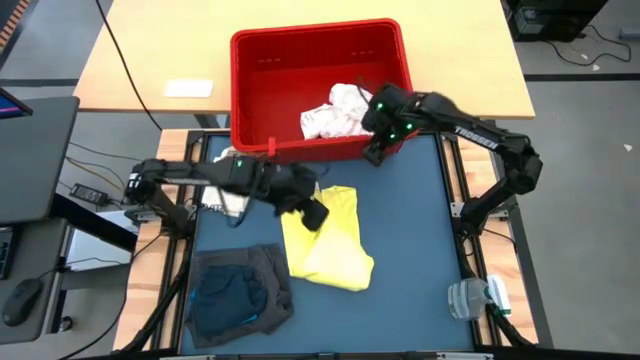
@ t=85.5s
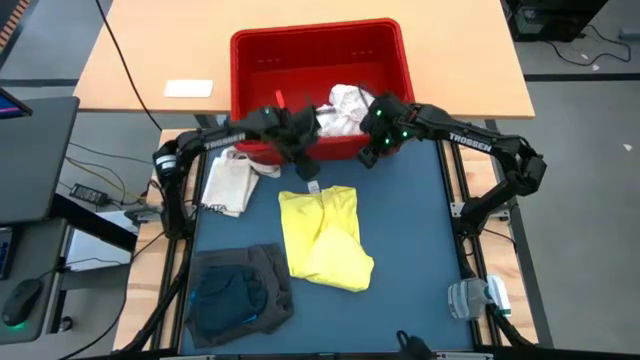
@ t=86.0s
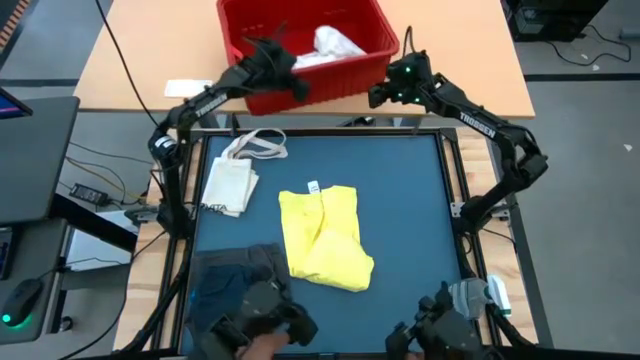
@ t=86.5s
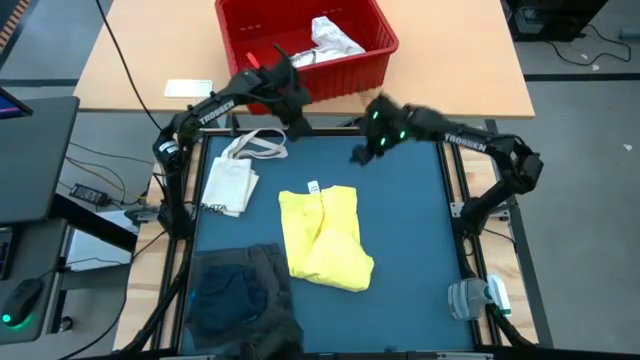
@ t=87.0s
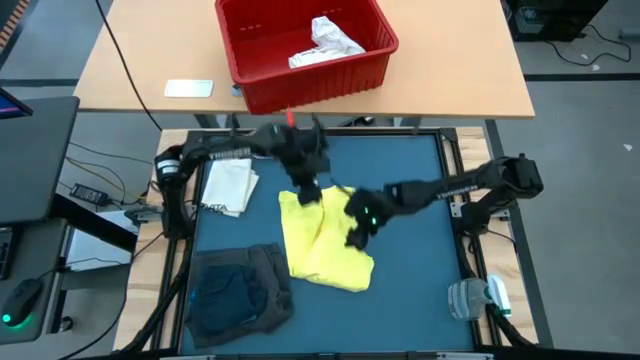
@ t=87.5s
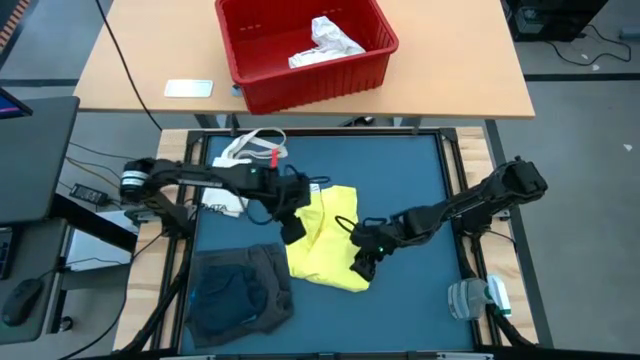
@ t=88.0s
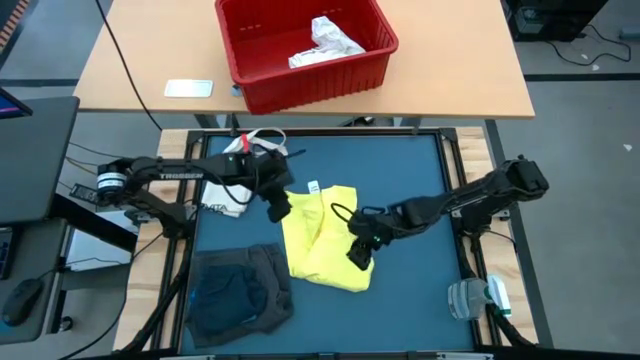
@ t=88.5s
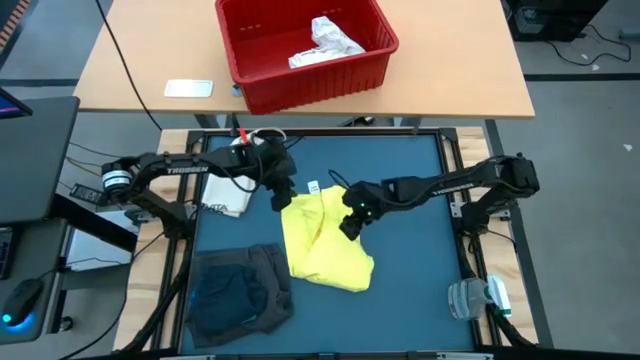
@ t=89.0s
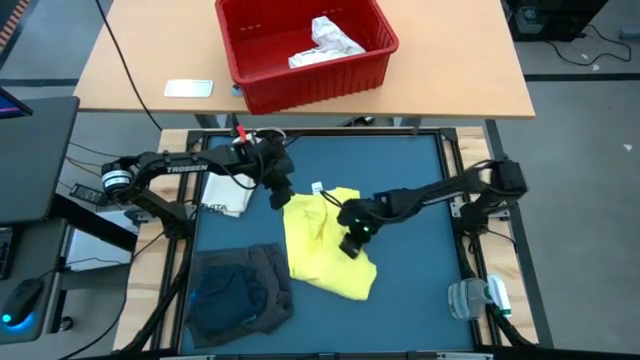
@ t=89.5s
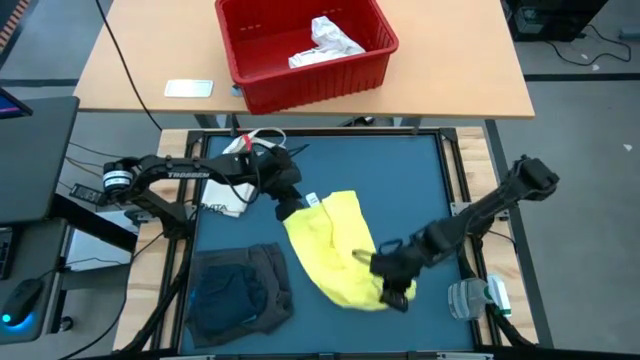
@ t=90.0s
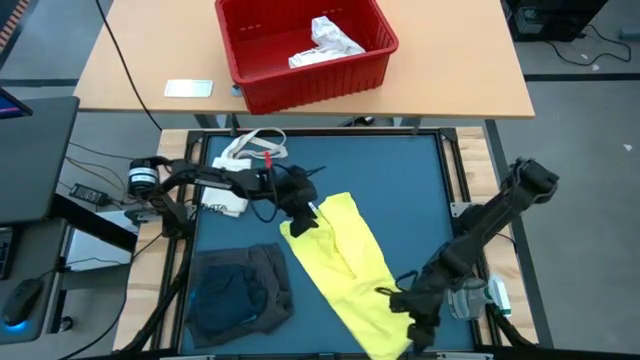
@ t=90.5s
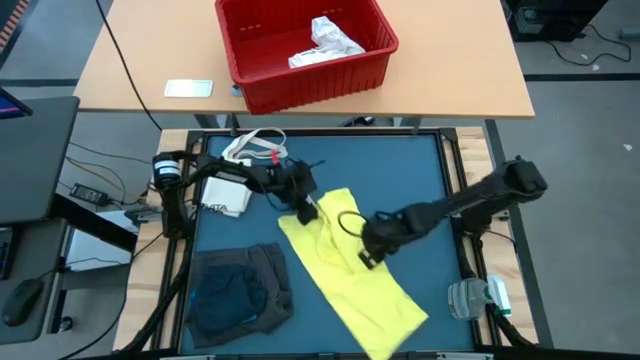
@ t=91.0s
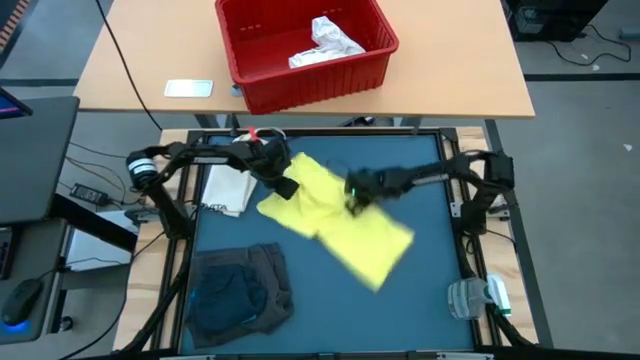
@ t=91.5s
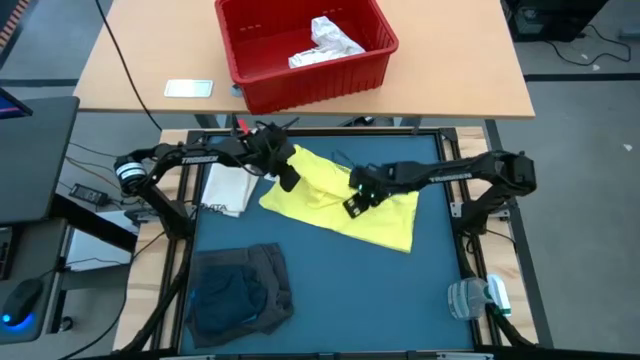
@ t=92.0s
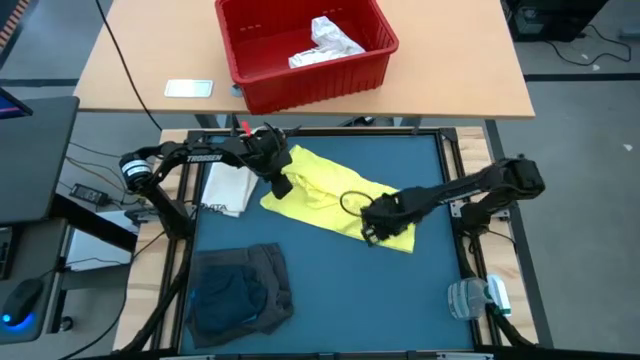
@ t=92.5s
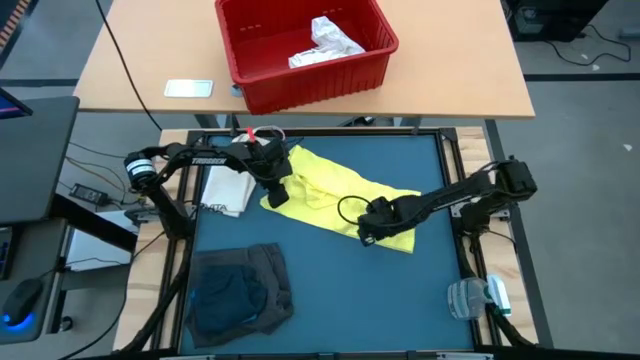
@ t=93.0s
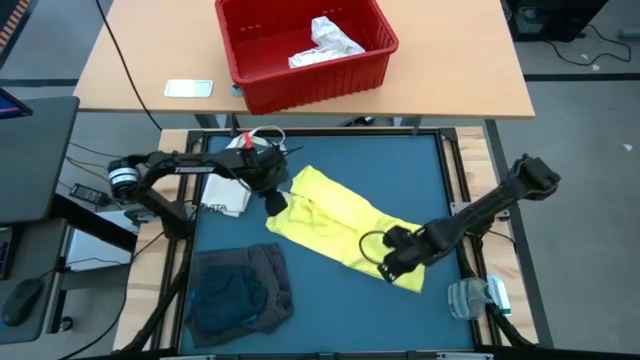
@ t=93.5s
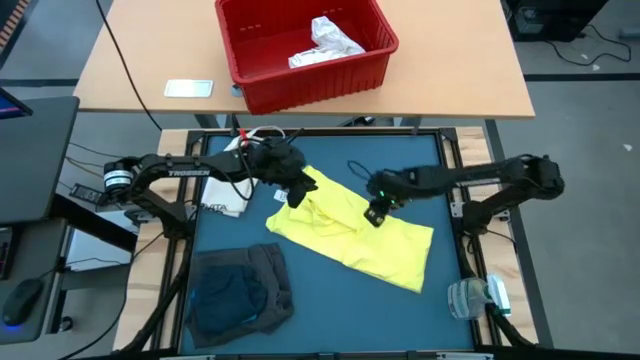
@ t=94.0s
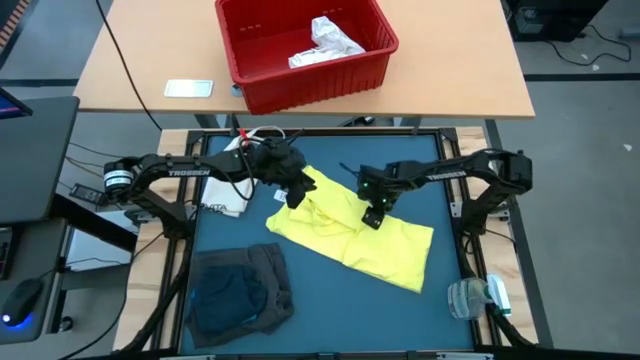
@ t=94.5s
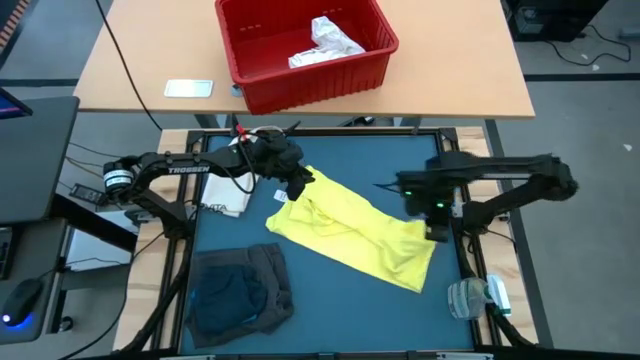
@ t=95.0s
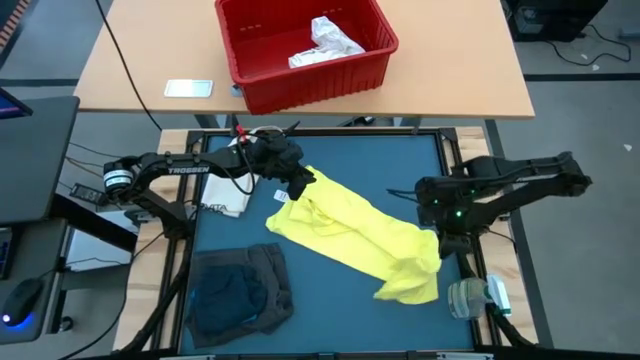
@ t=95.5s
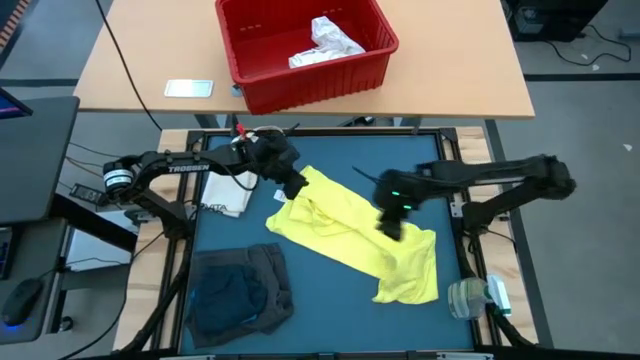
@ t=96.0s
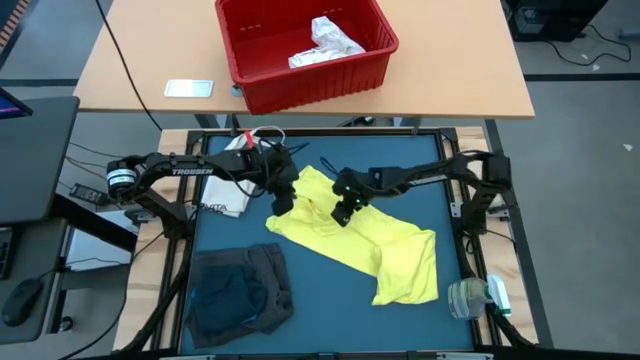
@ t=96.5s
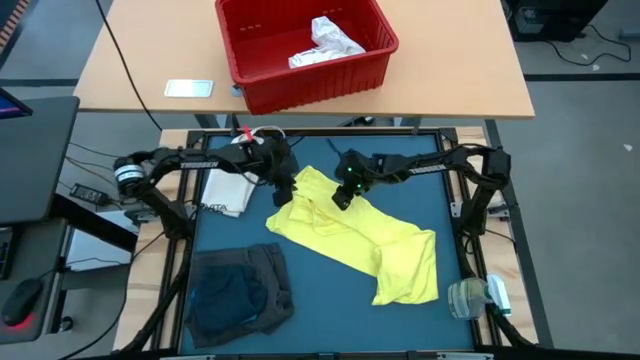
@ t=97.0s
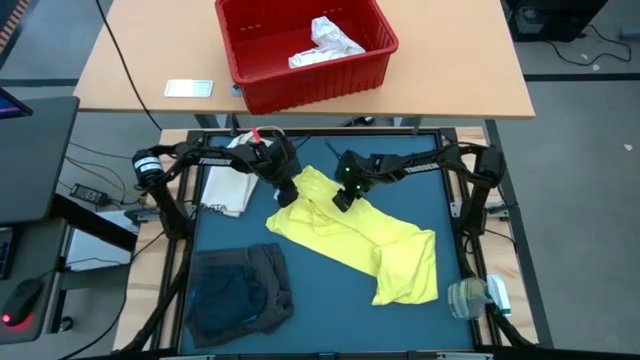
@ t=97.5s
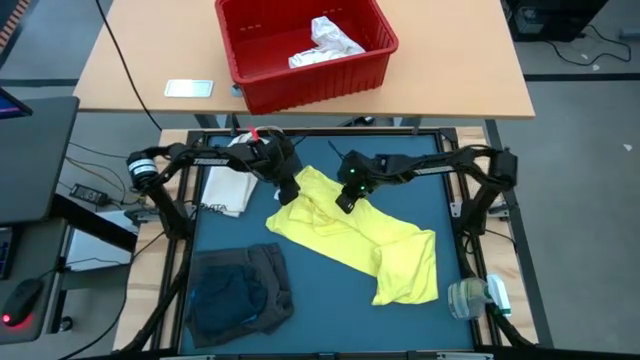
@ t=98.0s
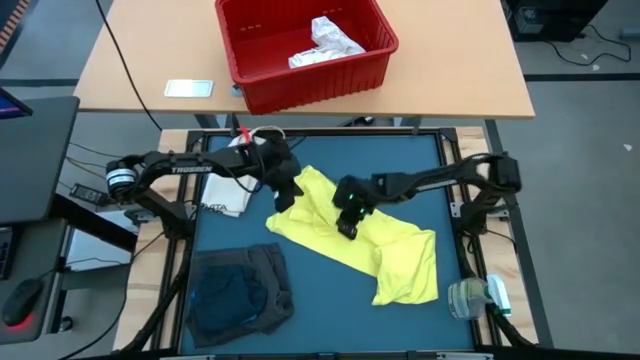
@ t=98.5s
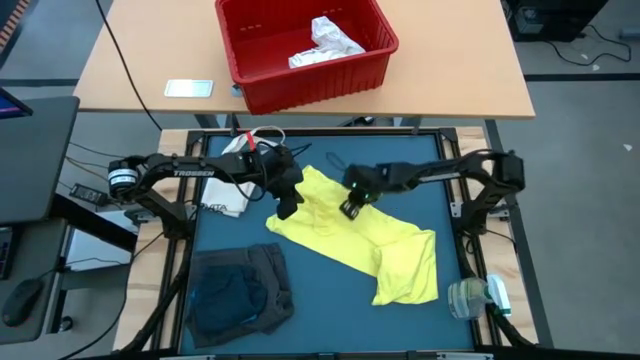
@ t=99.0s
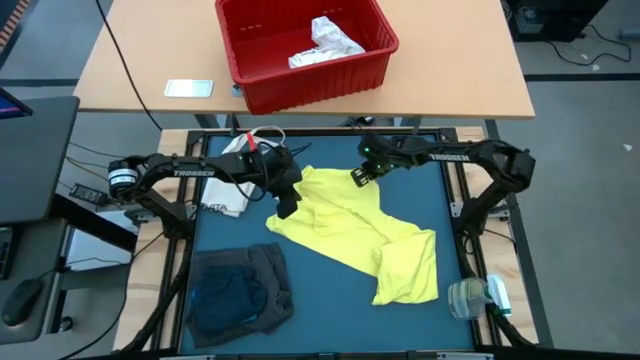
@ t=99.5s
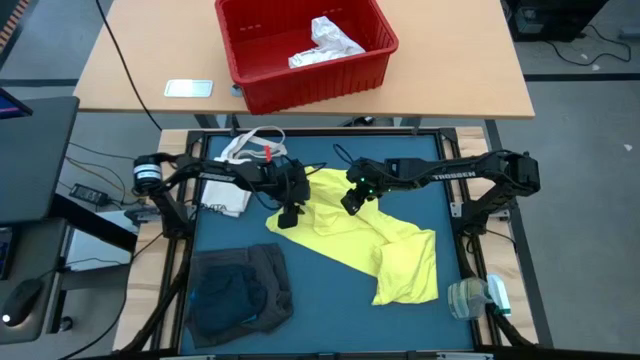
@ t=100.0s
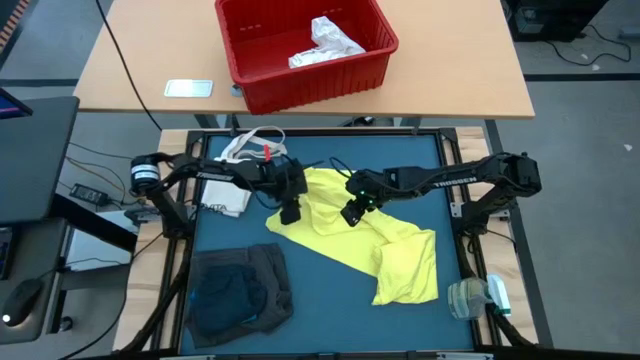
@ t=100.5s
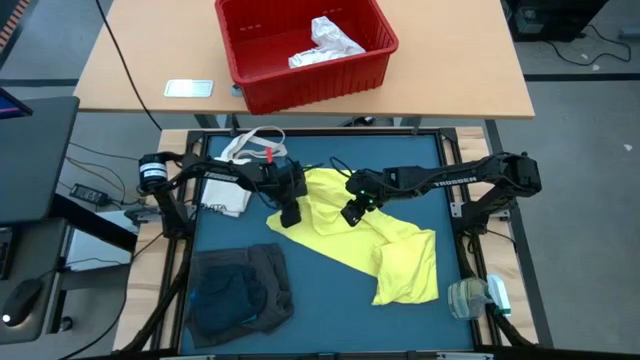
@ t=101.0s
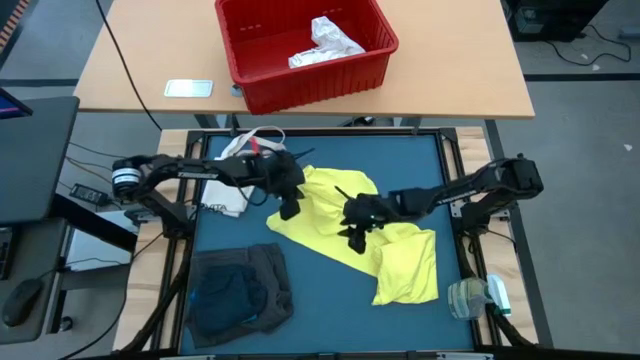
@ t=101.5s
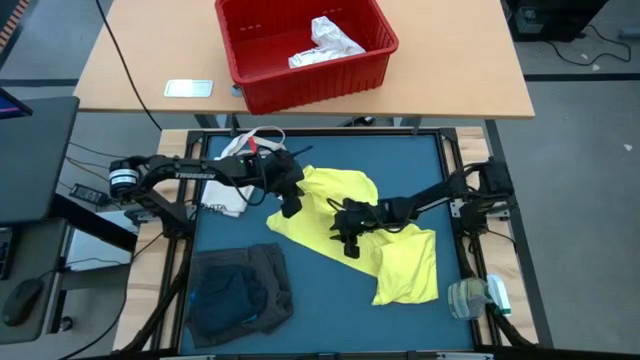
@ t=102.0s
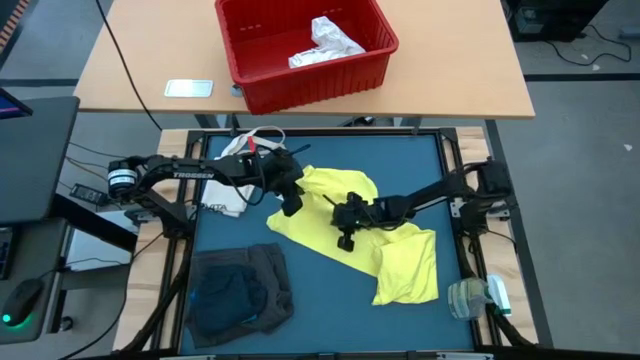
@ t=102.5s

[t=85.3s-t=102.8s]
Task: Fold laundry
Fold the yellow shirt

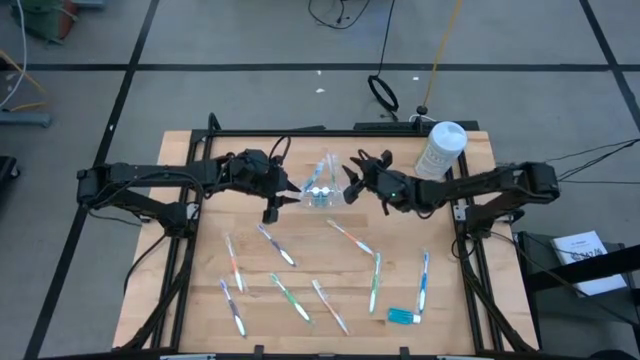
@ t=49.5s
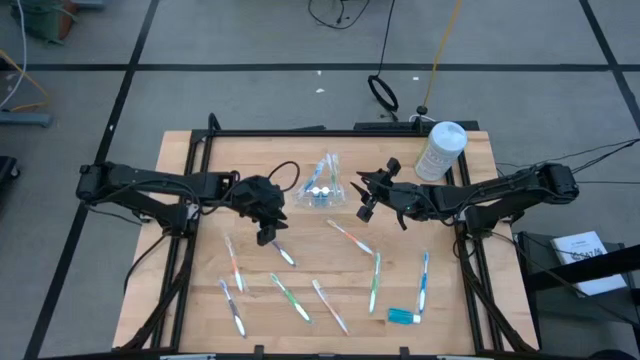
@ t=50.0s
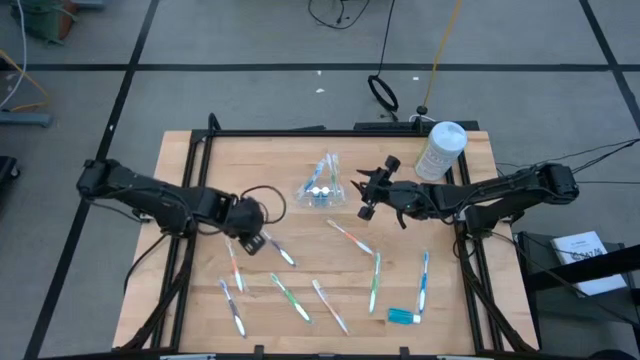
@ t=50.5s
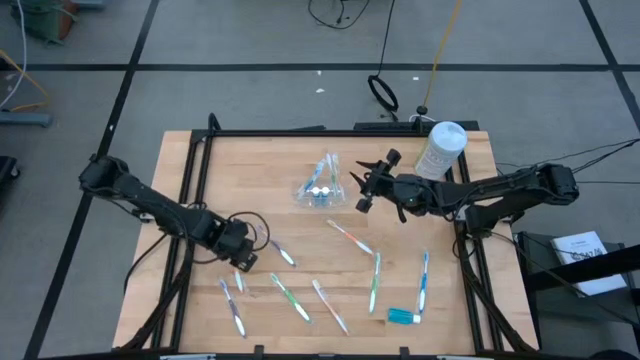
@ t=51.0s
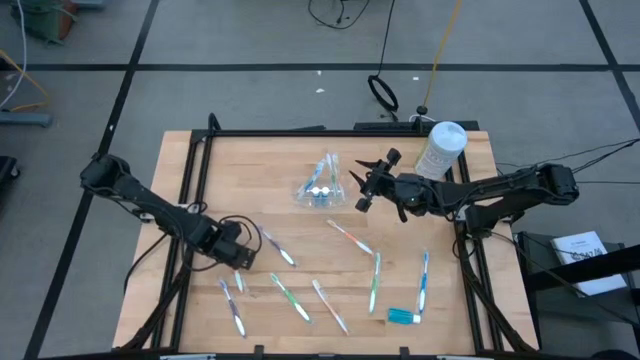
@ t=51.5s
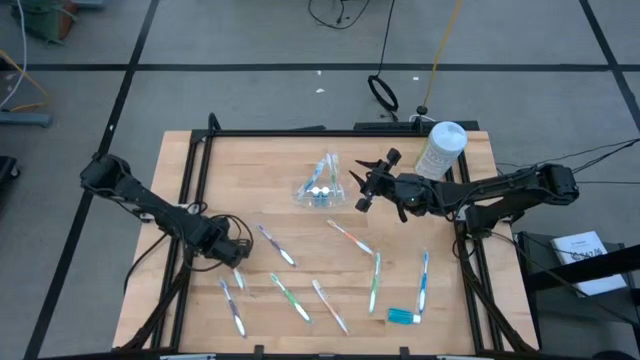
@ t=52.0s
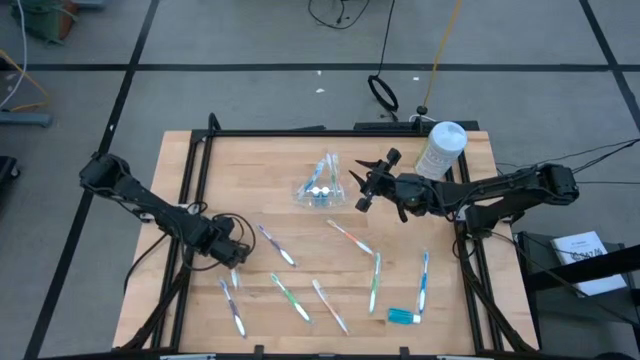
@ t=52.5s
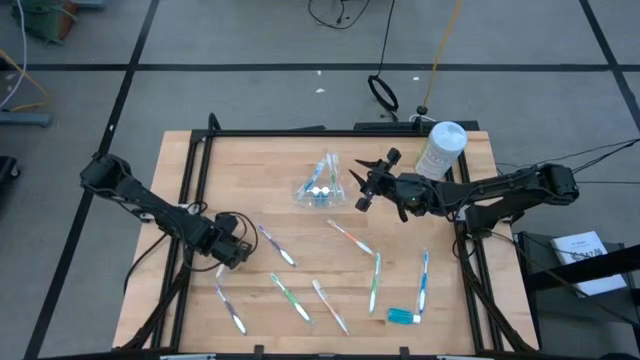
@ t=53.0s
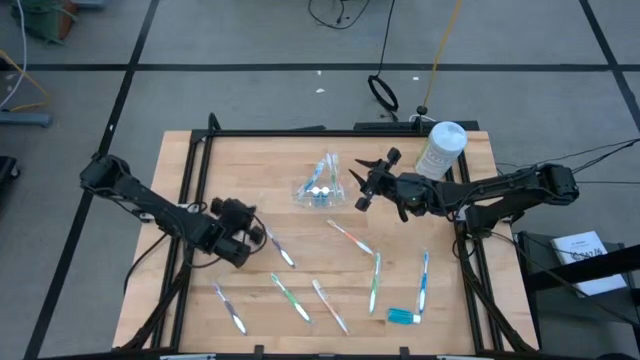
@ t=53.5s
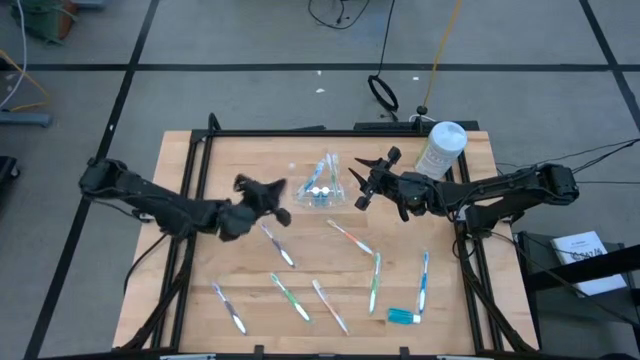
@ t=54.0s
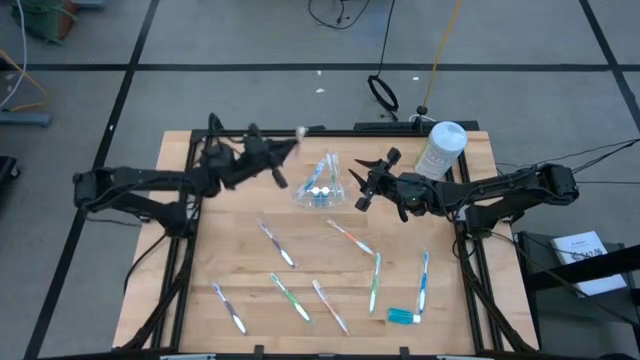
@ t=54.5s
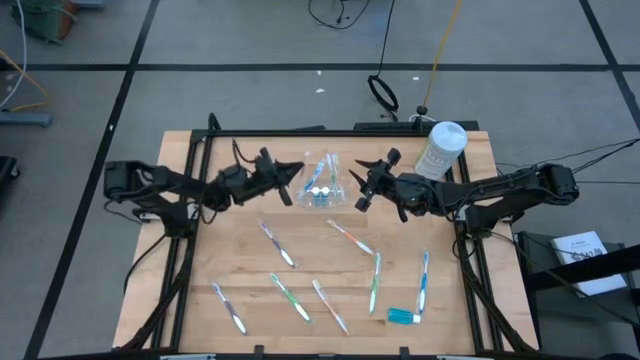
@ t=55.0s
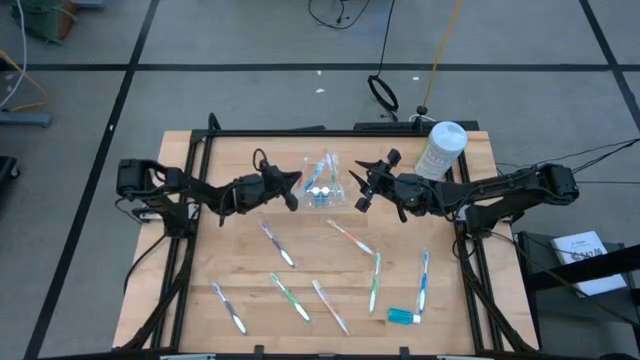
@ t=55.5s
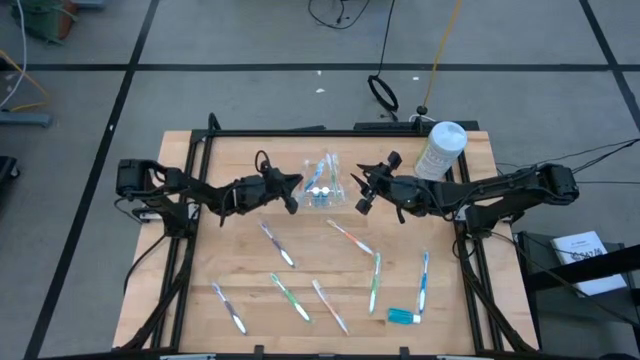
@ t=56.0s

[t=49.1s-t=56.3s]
Task: Pick & Place Toothbrushes
Put the orange toothbrush into the transparent organizer
